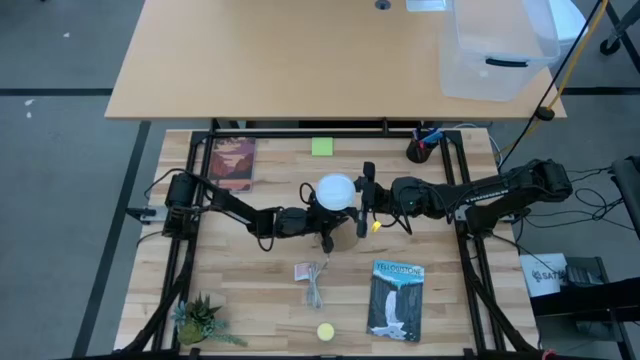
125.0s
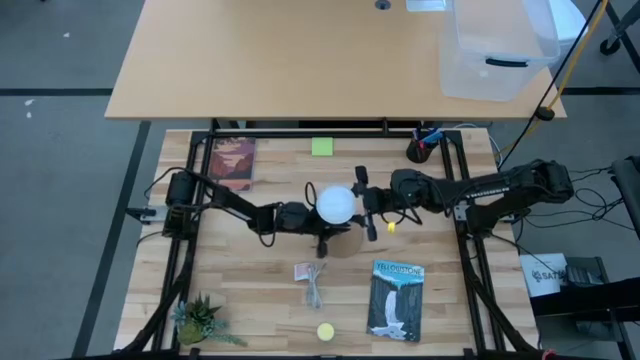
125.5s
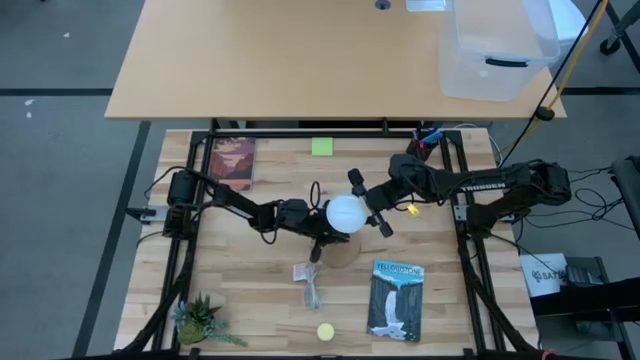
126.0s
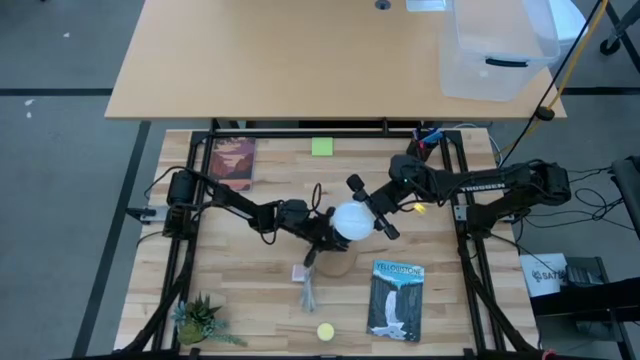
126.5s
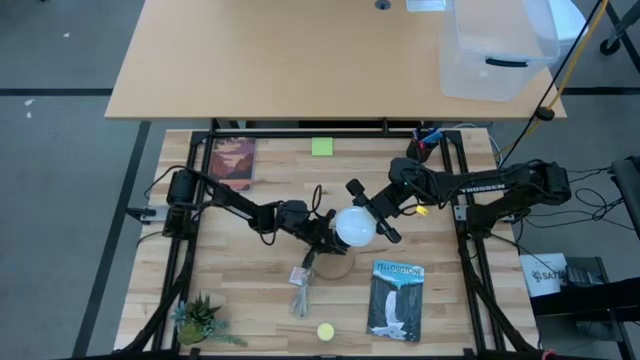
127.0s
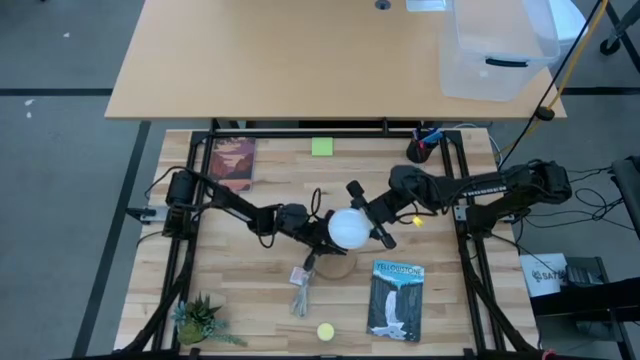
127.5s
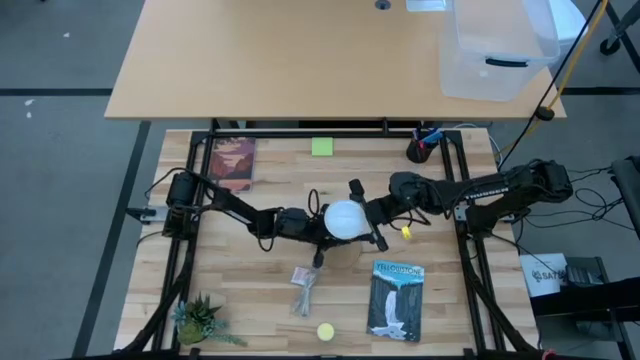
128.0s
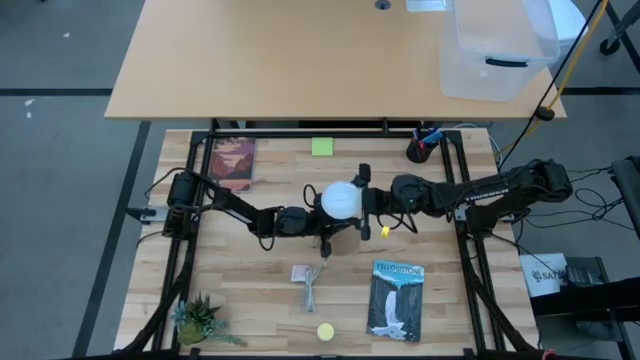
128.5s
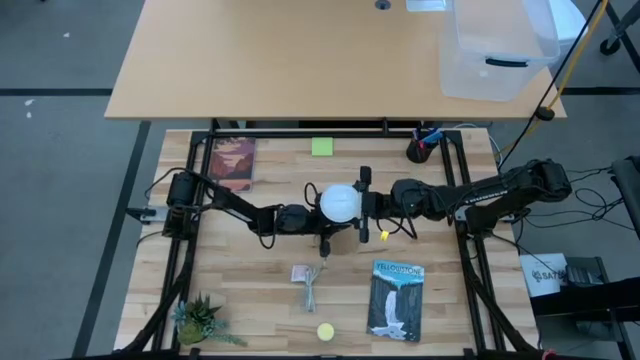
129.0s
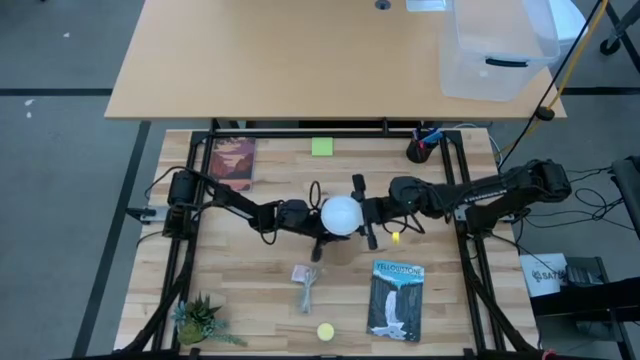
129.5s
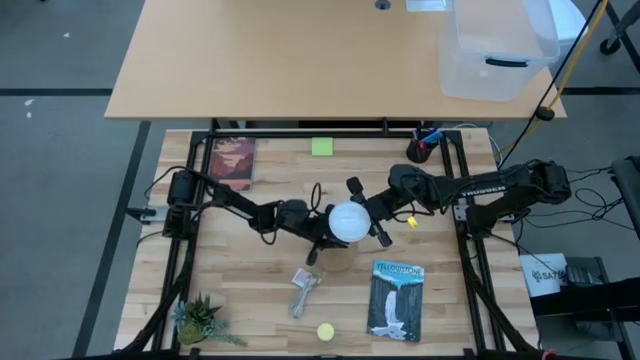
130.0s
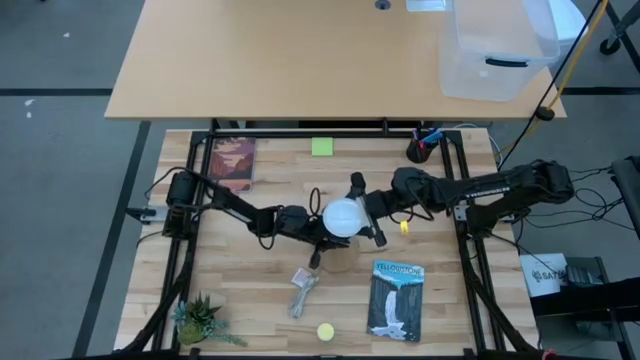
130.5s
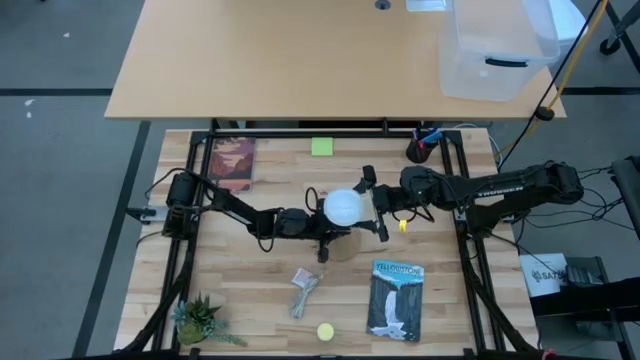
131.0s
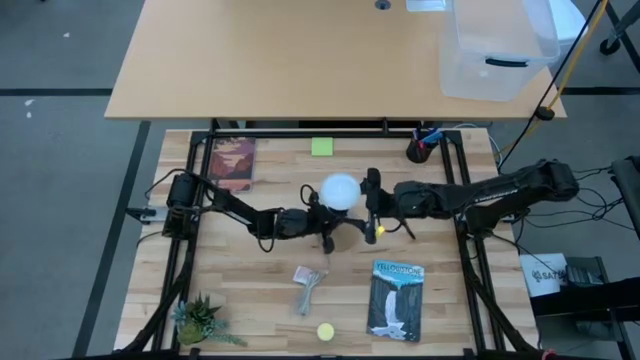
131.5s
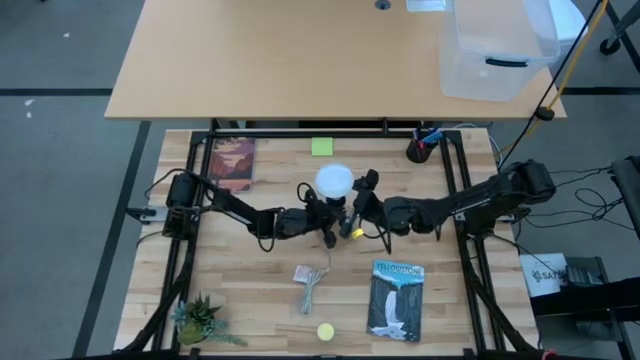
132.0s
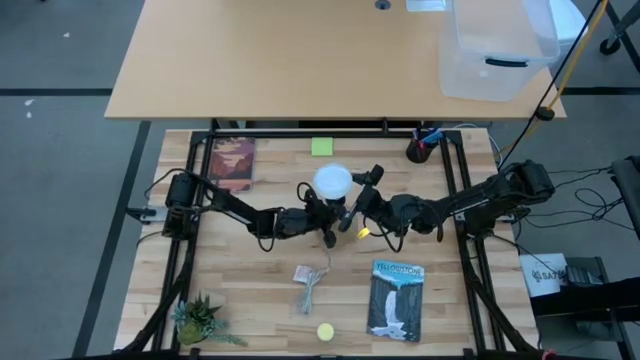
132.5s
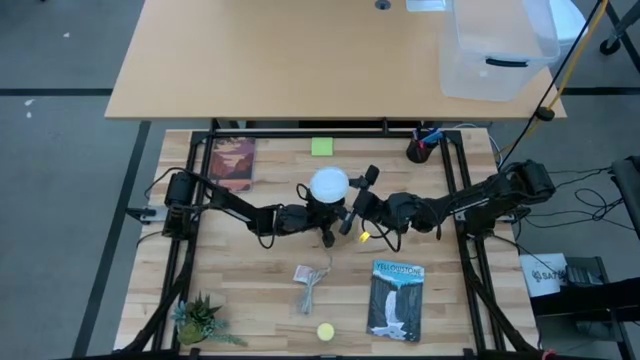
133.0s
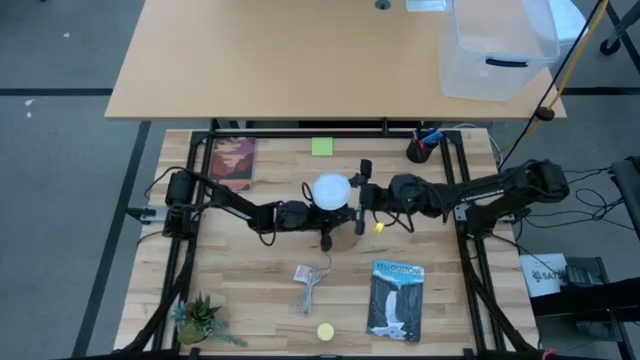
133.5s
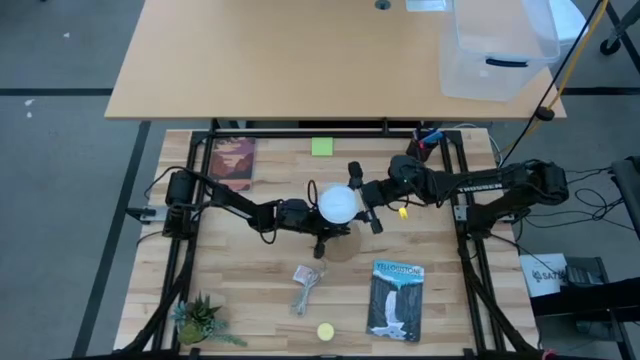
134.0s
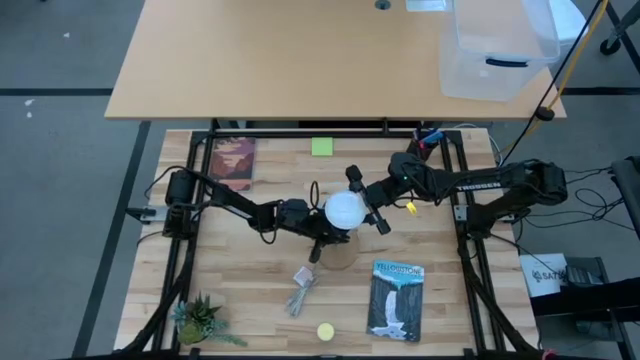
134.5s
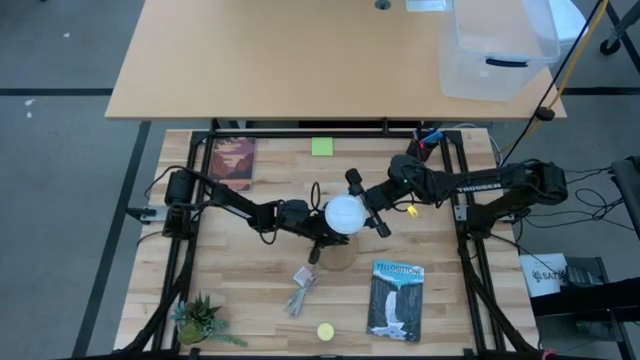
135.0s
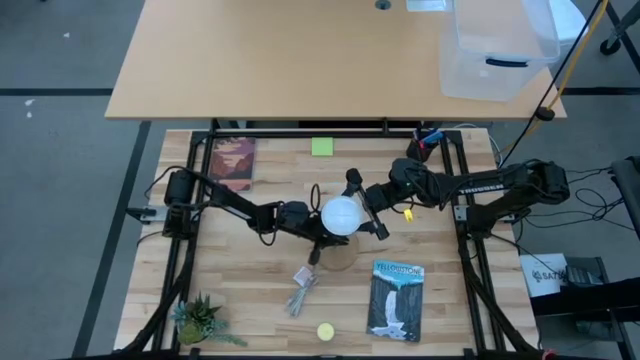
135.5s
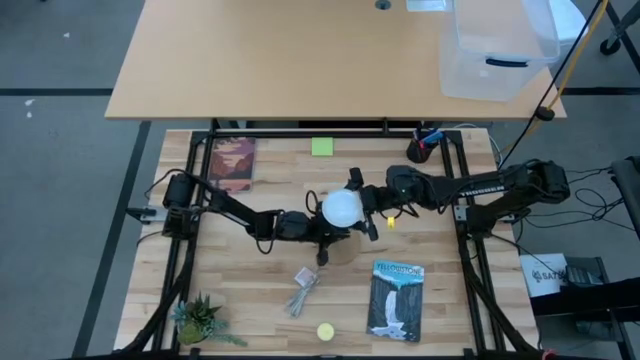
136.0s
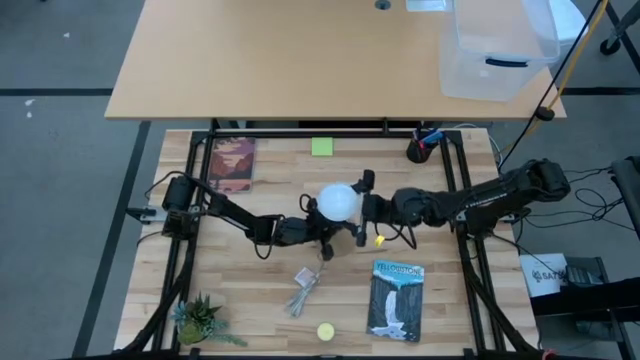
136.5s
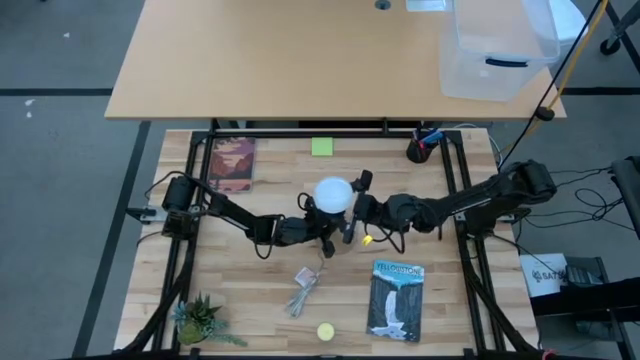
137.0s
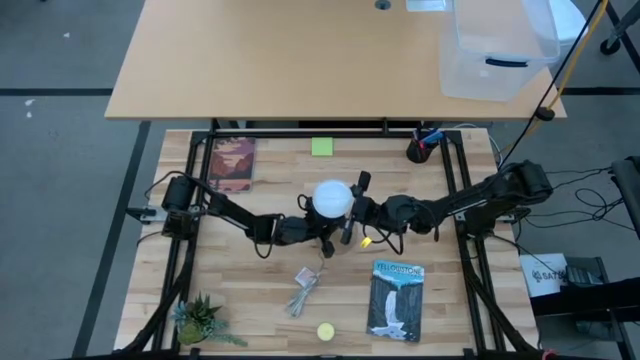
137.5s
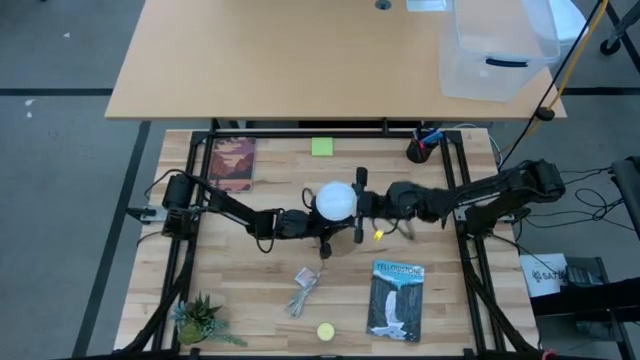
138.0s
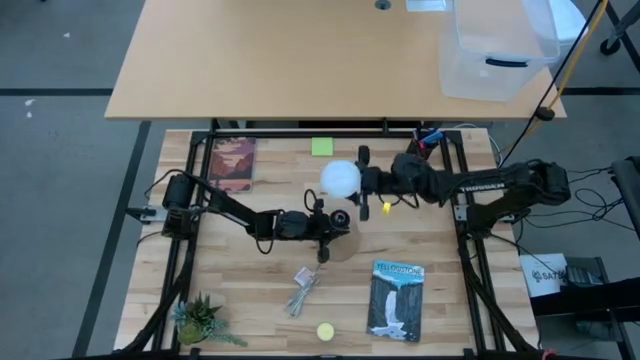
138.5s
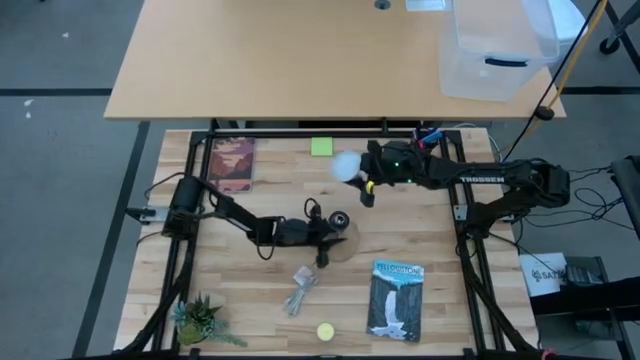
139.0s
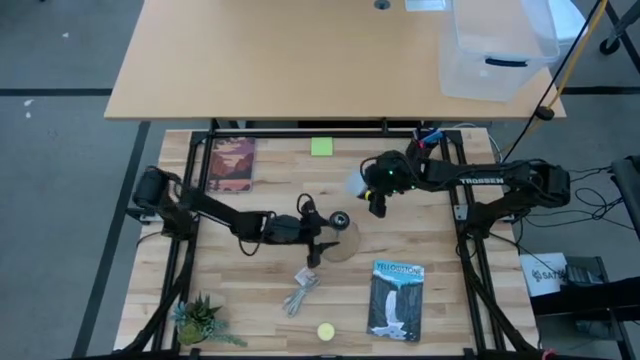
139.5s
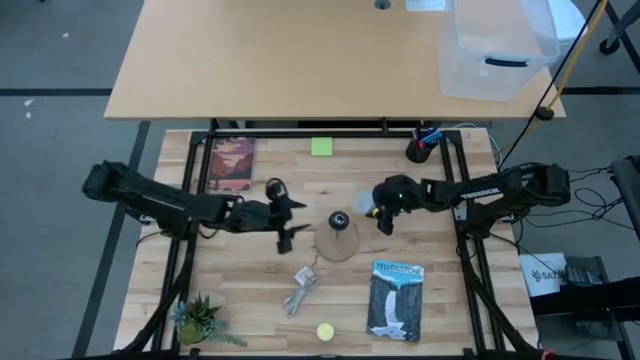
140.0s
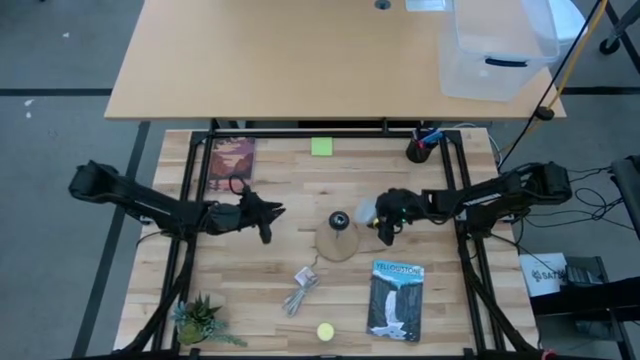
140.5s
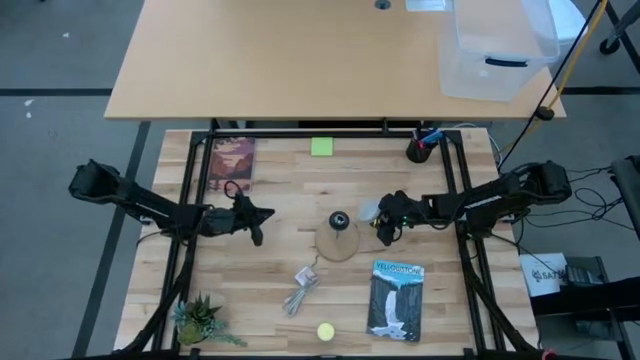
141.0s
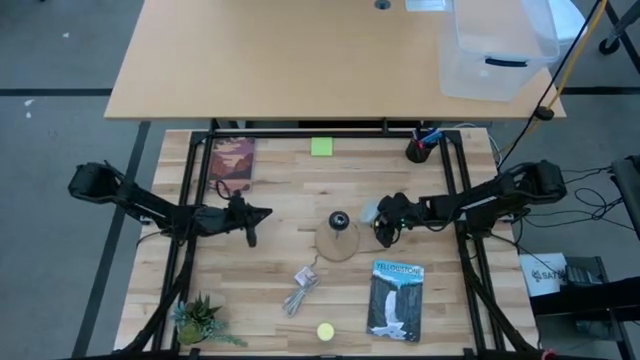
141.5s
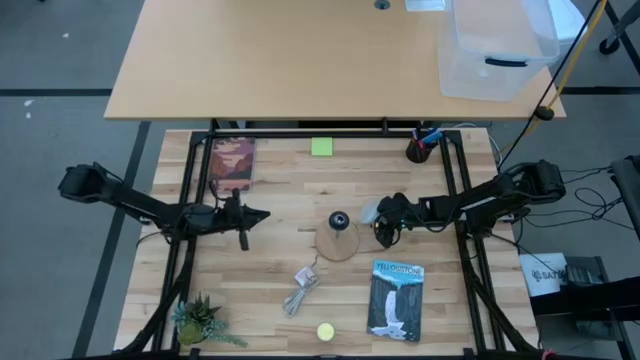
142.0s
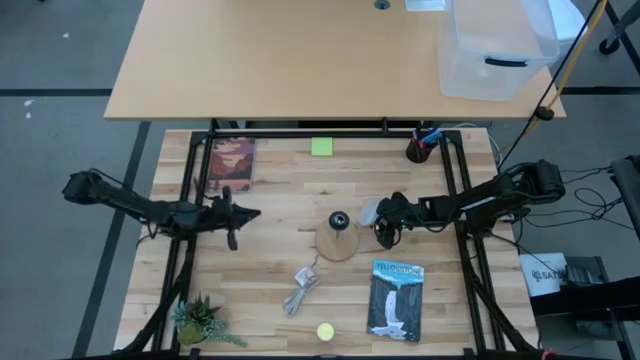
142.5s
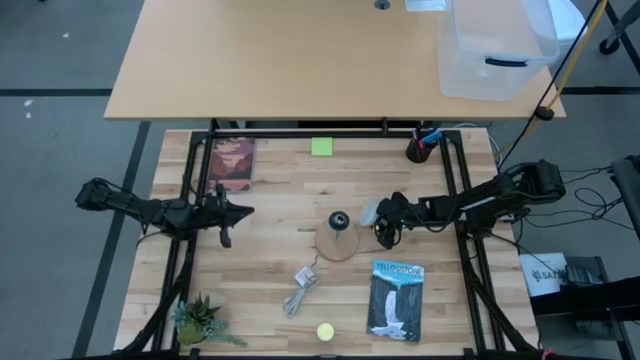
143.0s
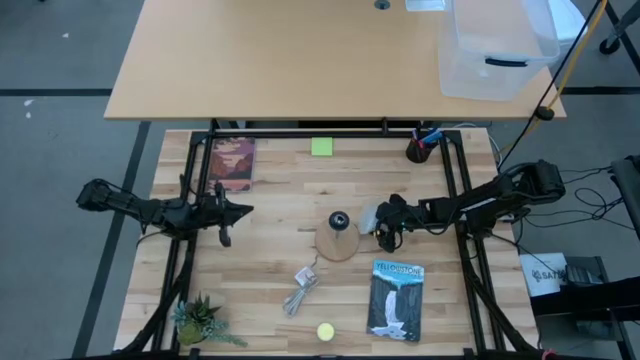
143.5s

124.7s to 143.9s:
Task: Screw lightbulb
Remove the white lightbulb from the brown lamp

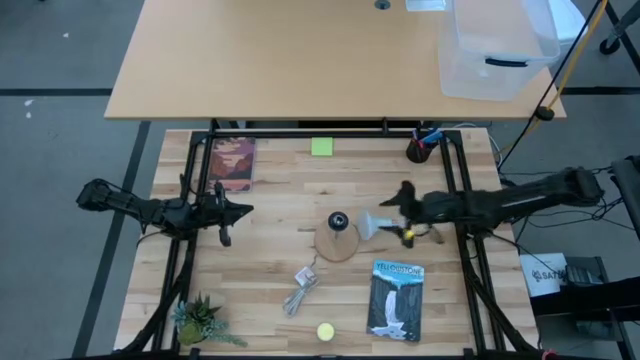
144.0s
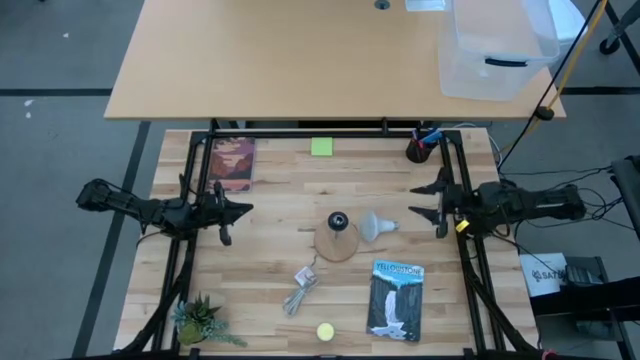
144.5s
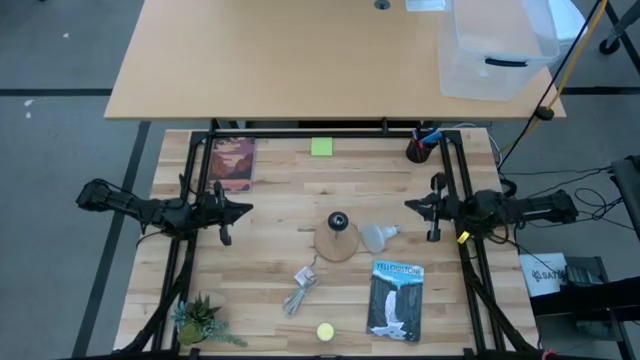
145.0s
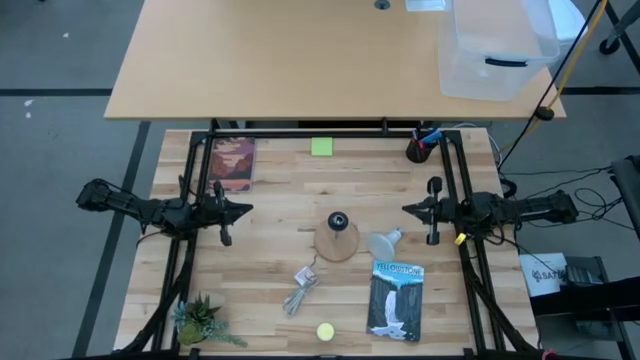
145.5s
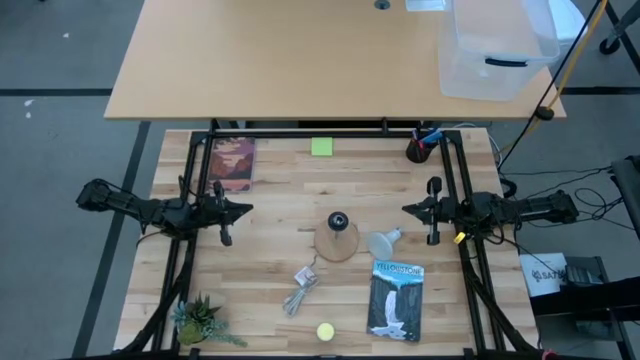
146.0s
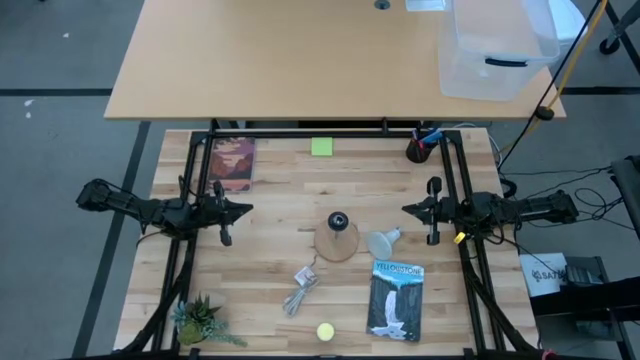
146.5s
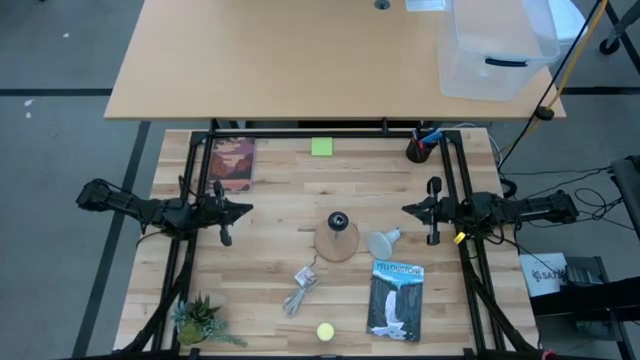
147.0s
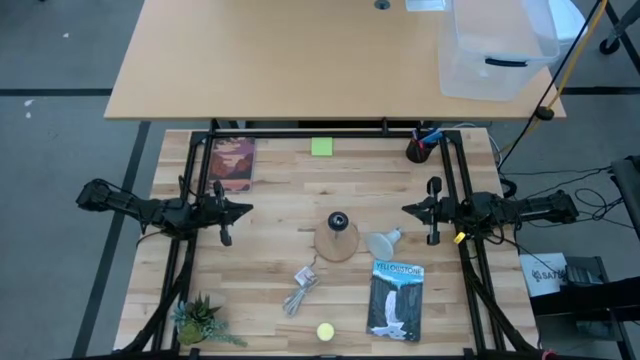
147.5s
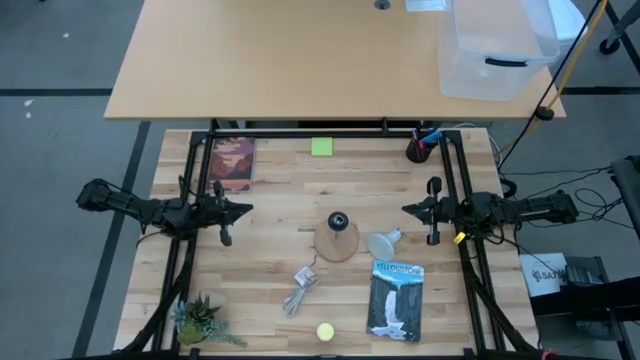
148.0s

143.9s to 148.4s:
Return to Home Position
